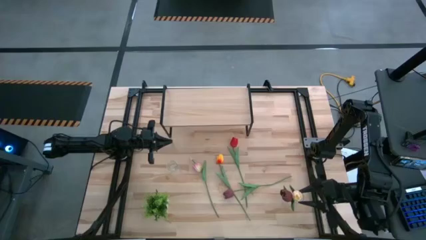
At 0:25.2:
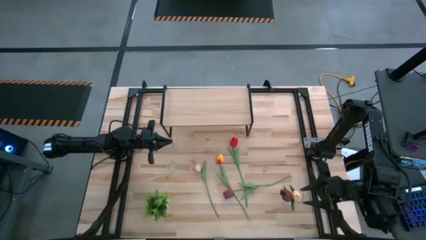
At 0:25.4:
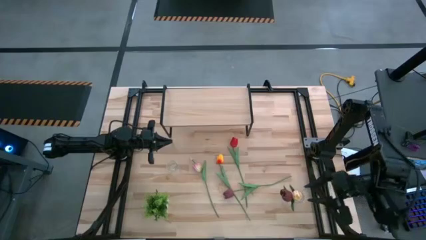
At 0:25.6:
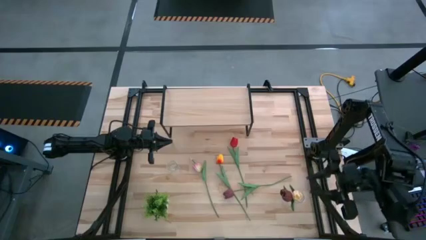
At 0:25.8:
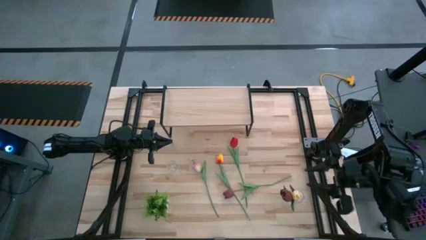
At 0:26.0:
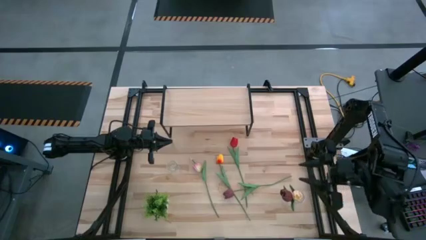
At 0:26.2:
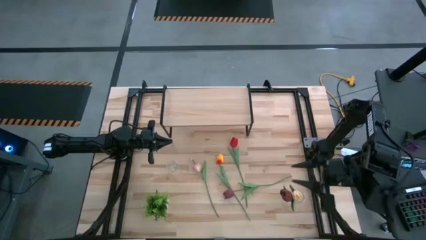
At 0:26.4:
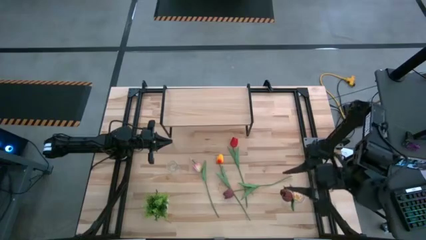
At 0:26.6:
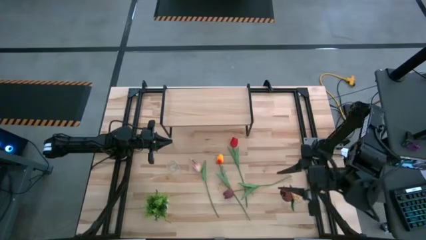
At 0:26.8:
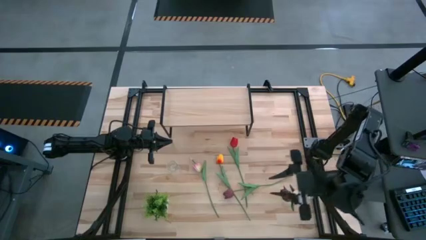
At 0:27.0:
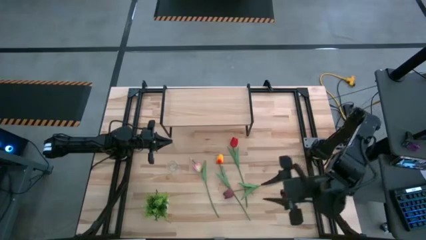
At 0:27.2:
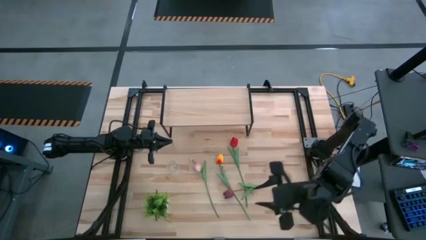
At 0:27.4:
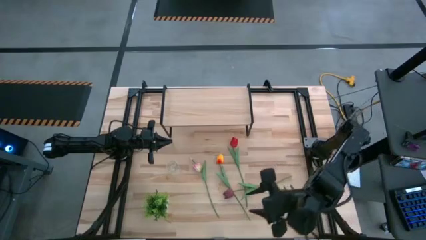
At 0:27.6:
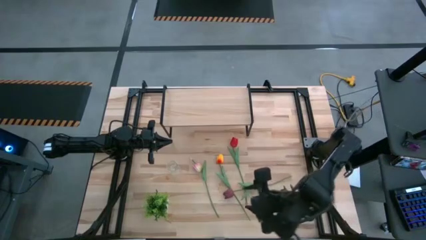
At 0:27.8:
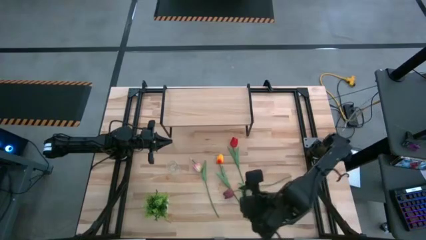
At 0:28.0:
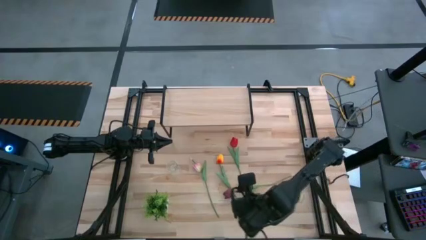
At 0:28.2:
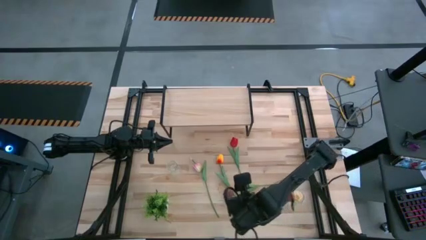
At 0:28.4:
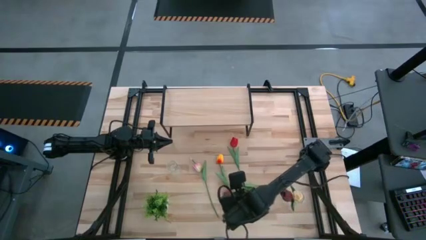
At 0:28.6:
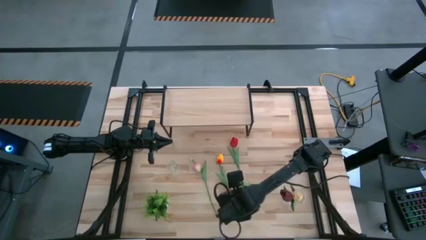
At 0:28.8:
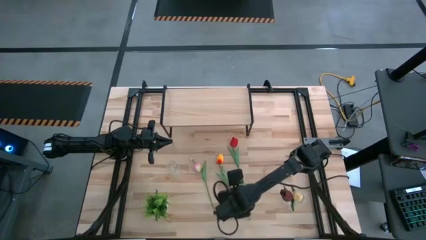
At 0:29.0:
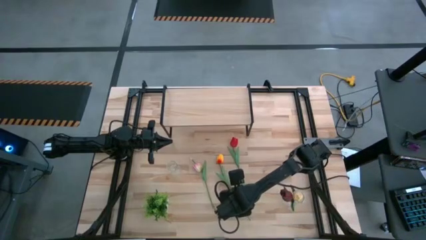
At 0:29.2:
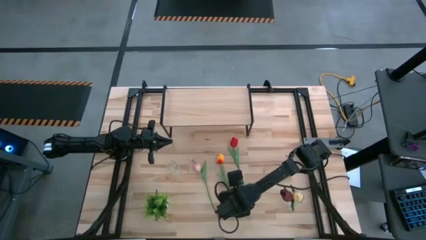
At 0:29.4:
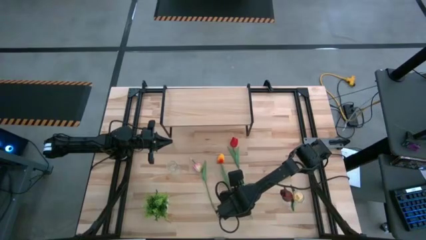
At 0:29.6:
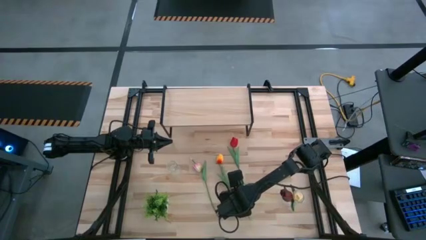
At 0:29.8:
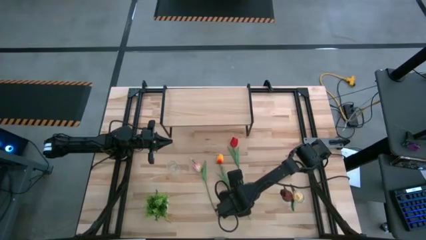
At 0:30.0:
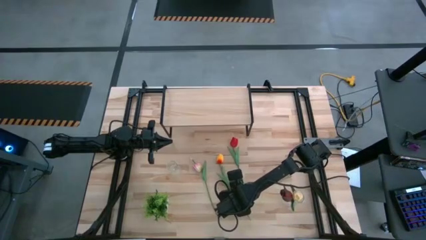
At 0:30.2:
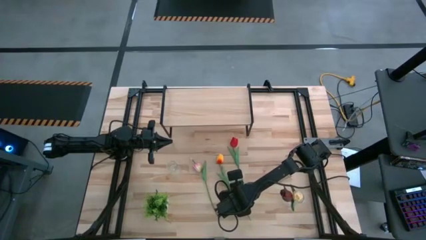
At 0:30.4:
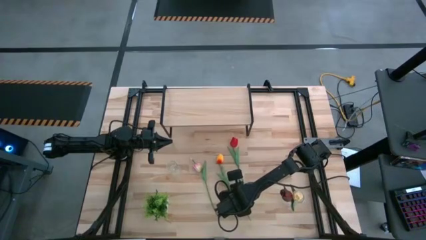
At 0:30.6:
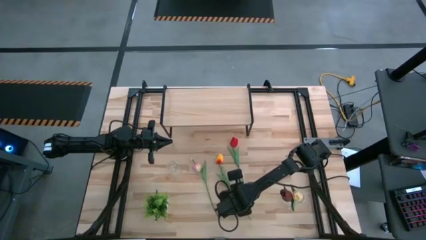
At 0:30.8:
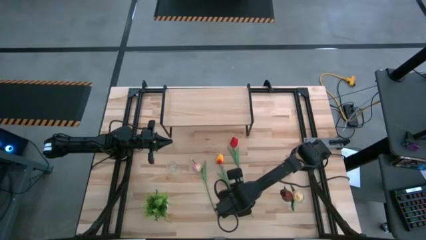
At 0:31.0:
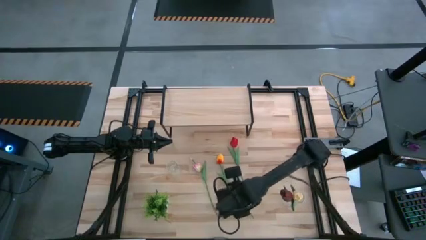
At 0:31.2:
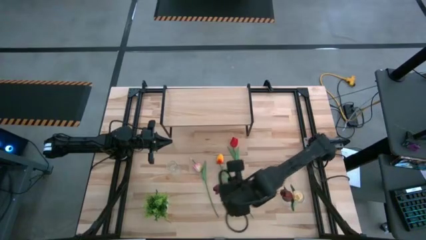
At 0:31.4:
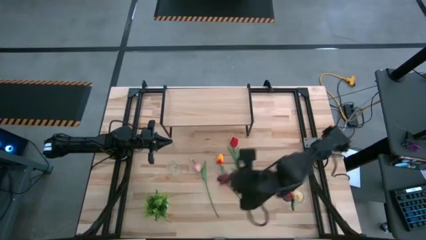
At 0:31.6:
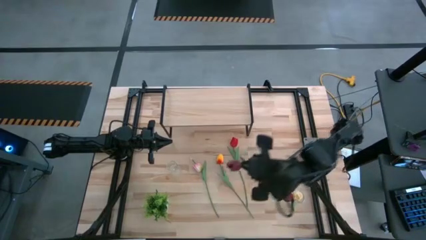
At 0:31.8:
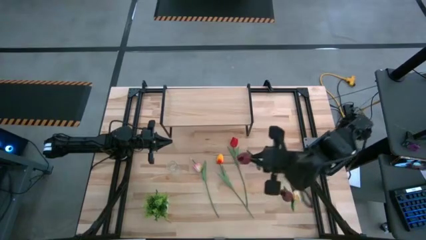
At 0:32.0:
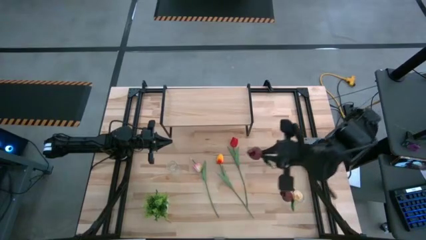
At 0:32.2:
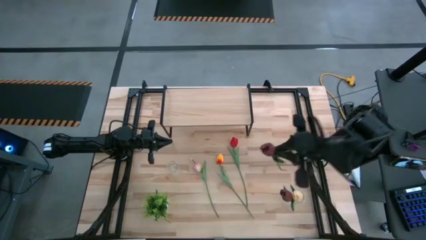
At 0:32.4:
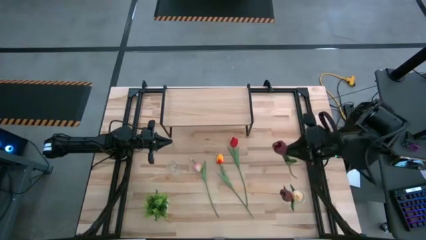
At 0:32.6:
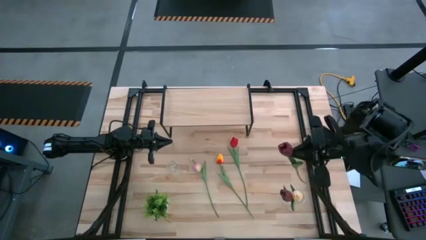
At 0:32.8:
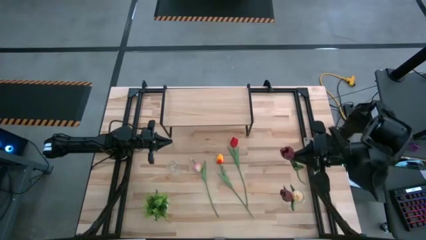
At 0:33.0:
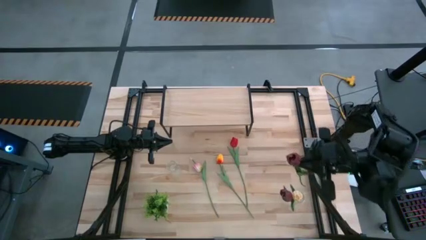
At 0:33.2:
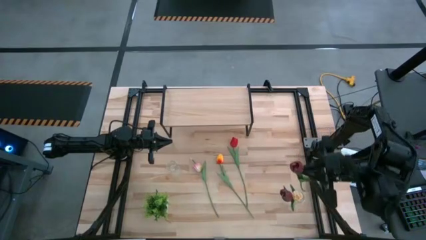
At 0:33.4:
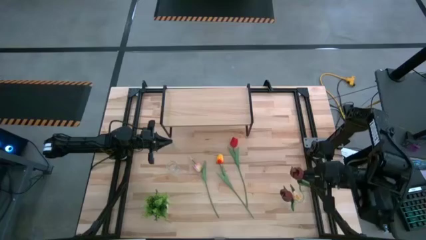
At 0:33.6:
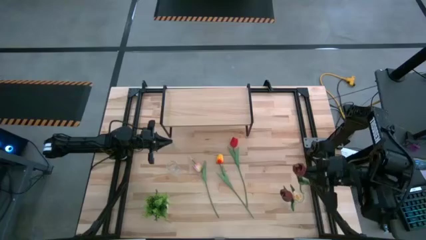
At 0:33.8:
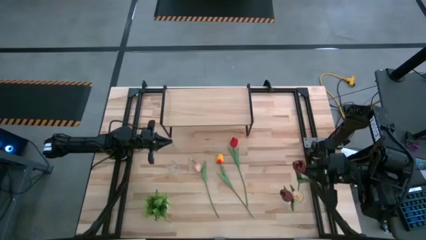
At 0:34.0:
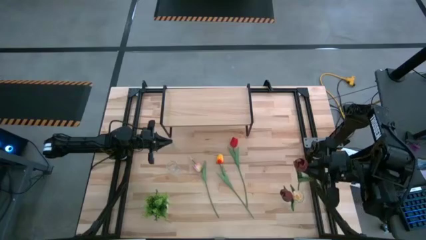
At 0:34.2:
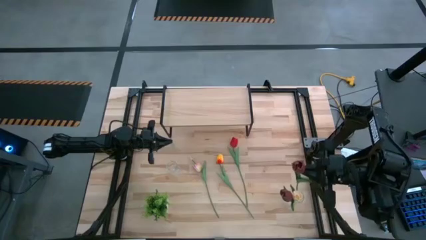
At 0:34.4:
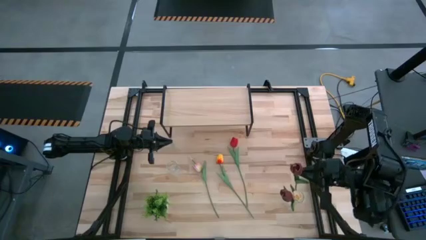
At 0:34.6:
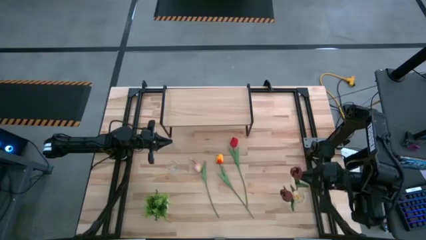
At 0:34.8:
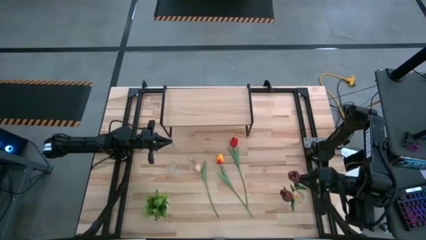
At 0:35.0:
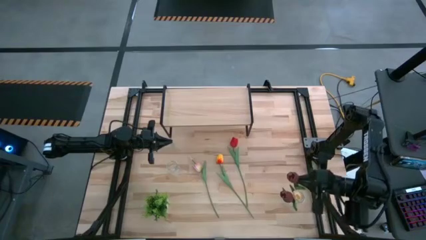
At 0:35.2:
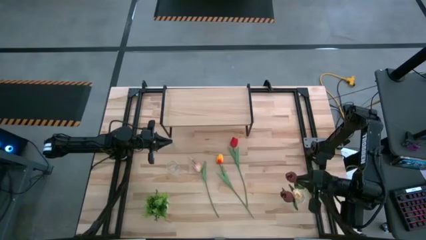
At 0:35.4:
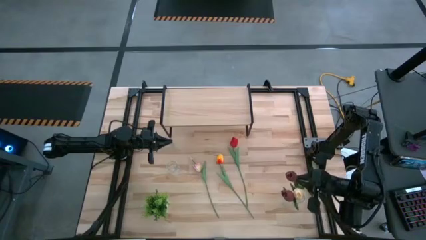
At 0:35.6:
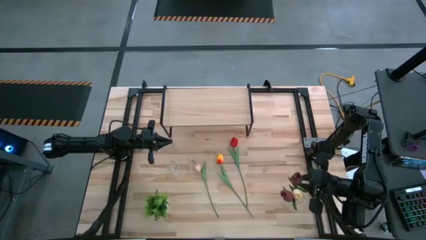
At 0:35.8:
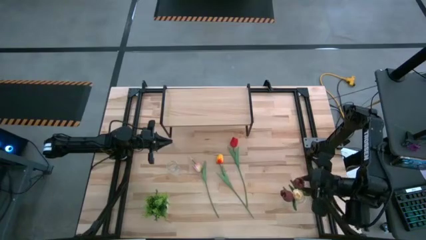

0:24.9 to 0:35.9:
Task: Pick and place flowers into a vace then onto a shelf
Put the dark red flower into the right transparent flower vase

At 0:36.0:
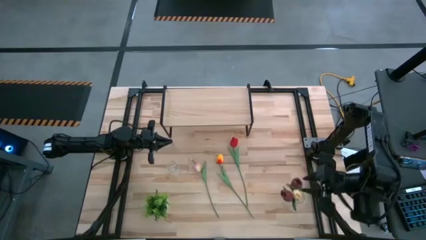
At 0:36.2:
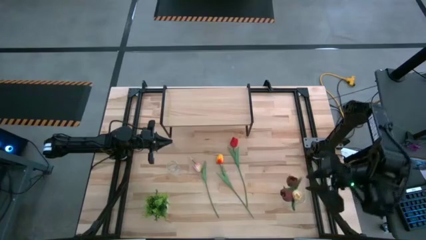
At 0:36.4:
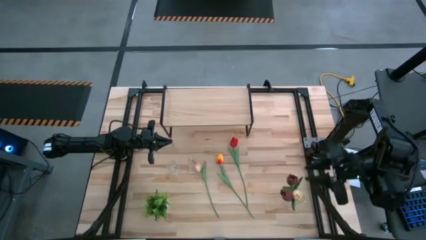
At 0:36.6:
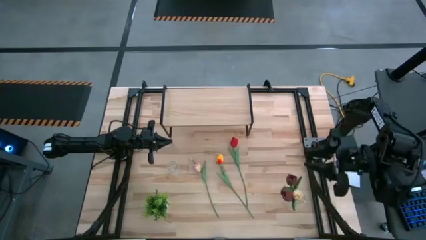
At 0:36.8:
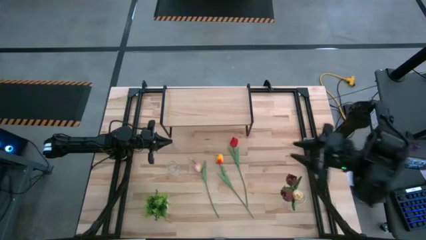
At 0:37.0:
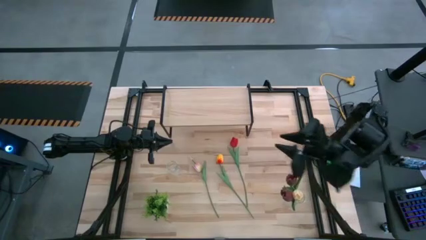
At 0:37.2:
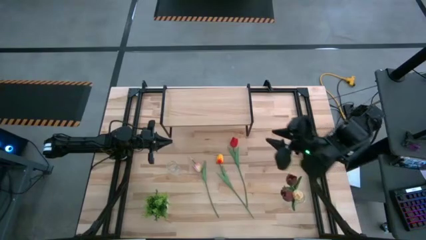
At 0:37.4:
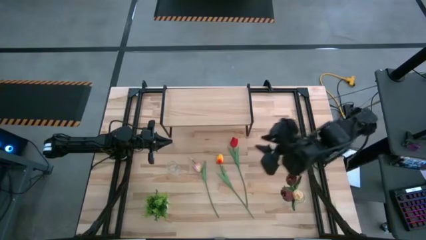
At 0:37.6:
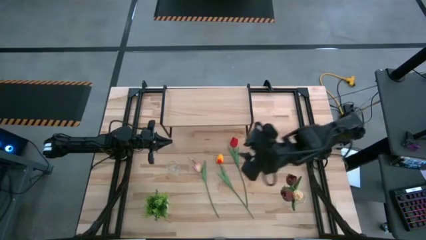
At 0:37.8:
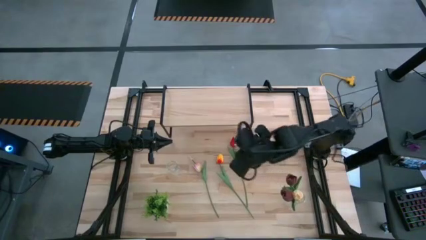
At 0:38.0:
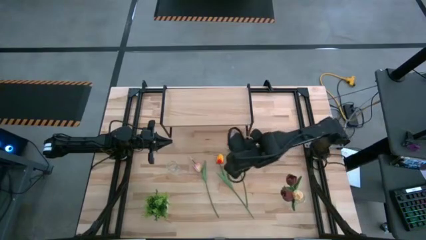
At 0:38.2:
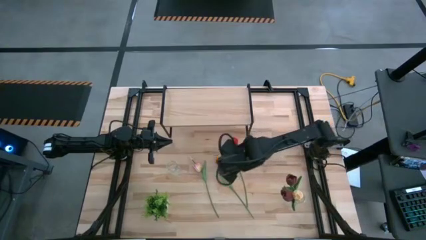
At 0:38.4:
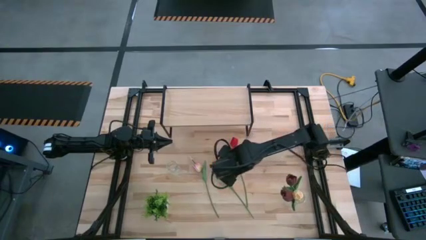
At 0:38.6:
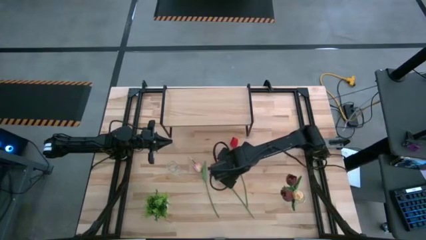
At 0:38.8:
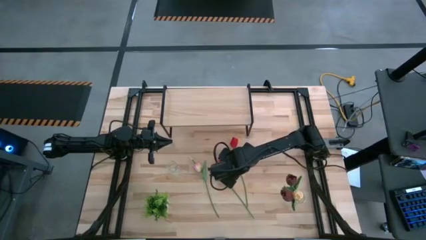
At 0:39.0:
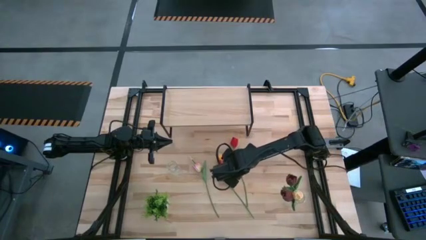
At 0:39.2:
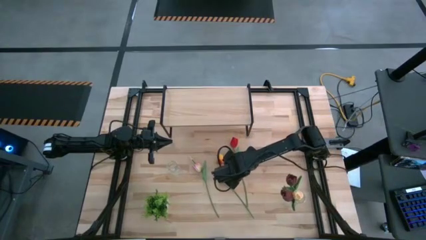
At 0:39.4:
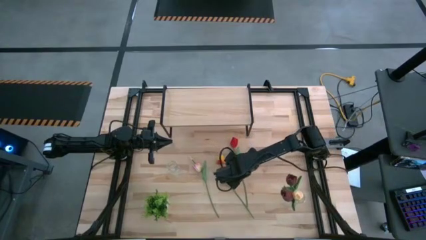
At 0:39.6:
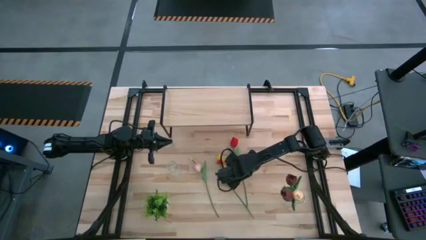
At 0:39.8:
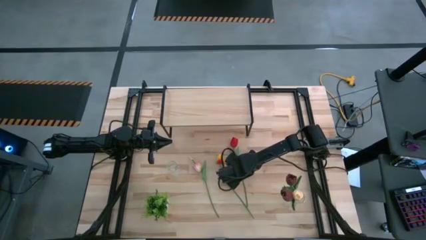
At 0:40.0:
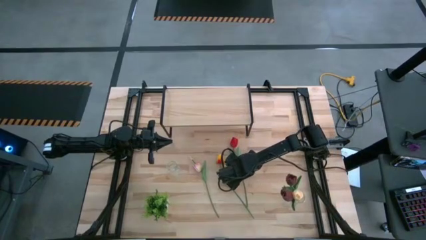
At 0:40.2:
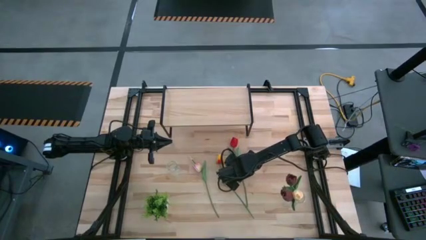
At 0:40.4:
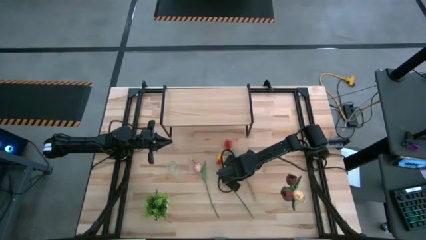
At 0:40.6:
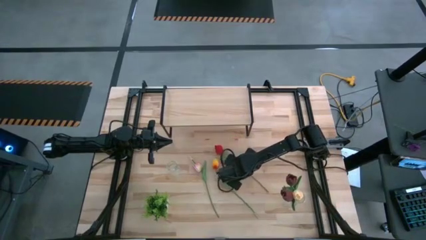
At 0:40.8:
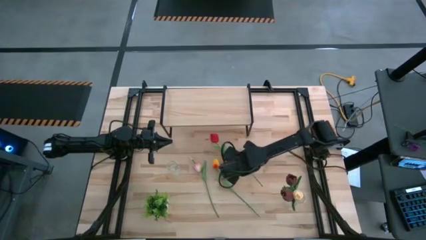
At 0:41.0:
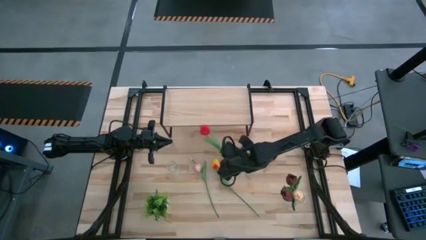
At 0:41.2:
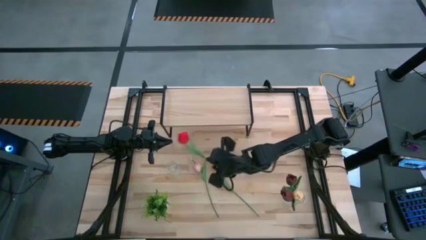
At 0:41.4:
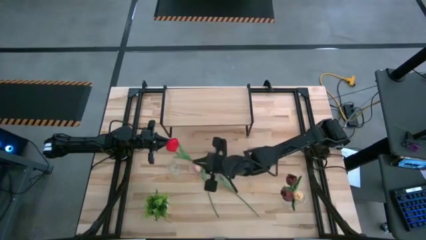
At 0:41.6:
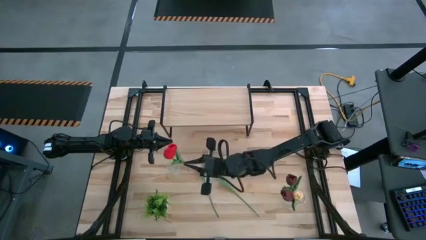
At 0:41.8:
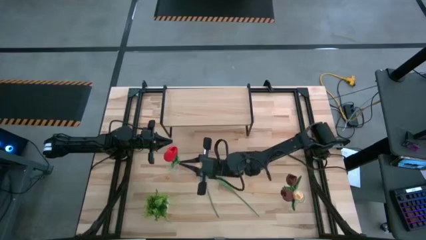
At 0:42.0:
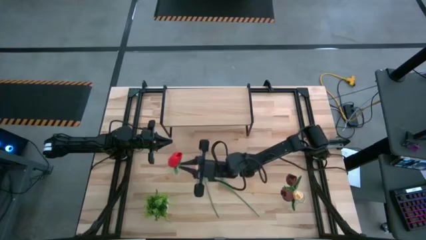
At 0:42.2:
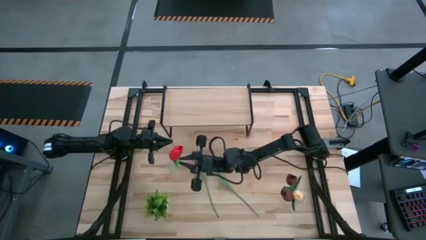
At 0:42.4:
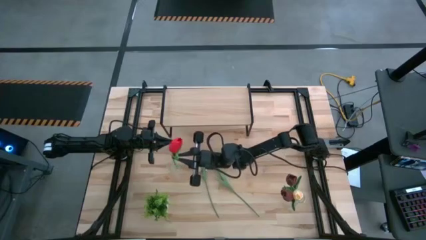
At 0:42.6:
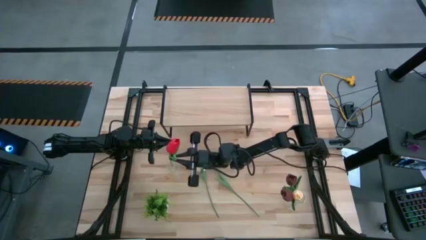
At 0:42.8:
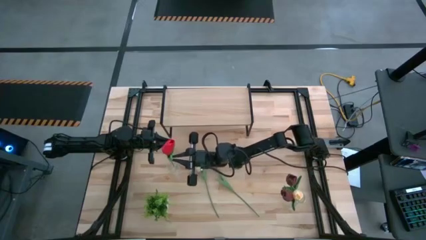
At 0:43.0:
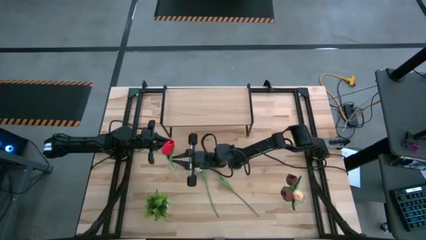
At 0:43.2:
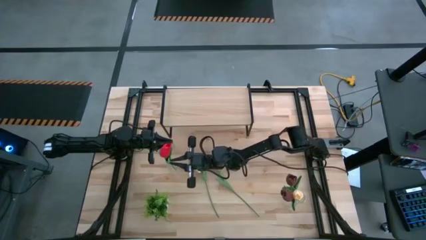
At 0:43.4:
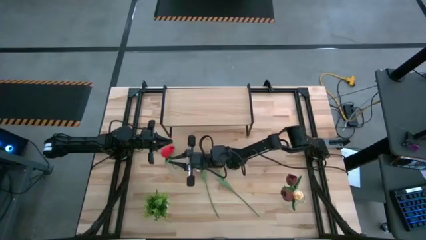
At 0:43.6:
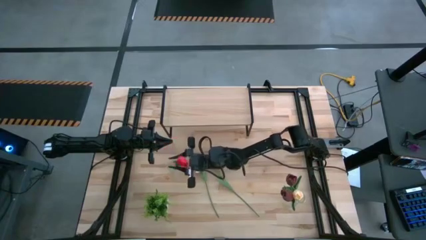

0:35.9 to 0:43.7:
Put the red flower into the left transparent flower vase
